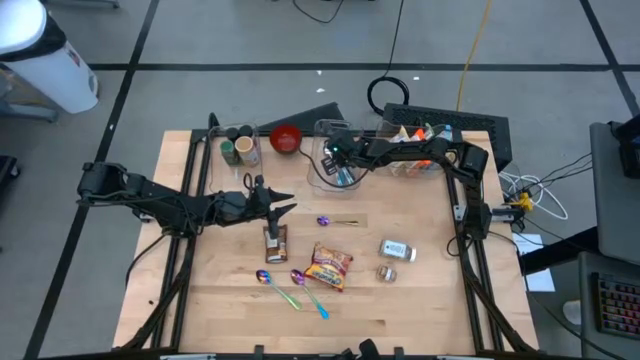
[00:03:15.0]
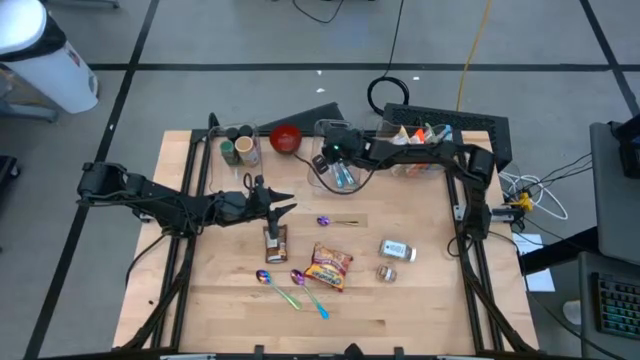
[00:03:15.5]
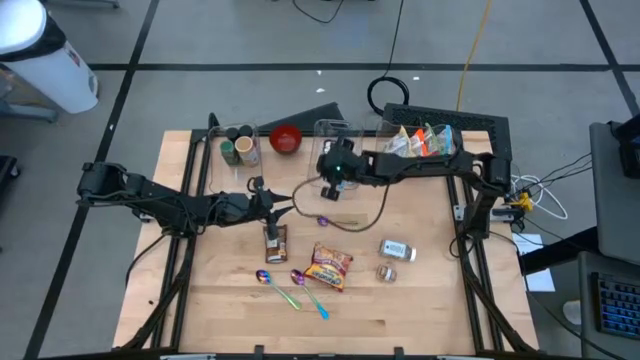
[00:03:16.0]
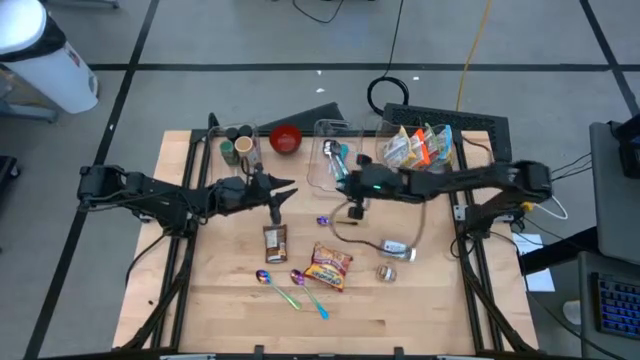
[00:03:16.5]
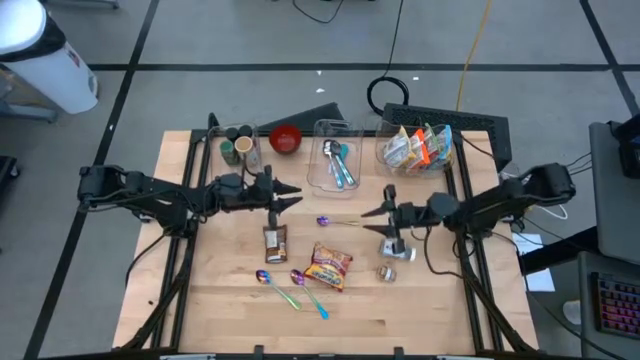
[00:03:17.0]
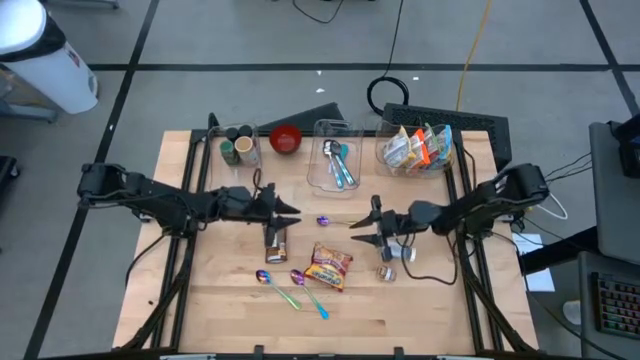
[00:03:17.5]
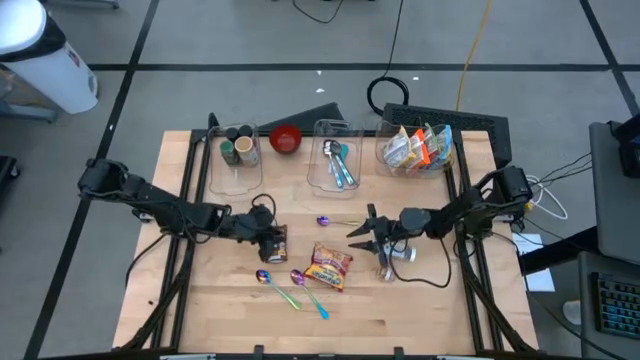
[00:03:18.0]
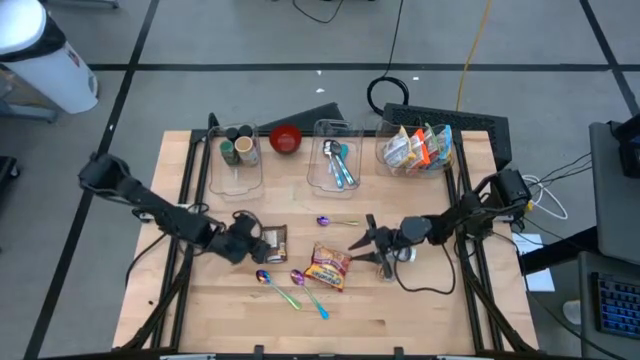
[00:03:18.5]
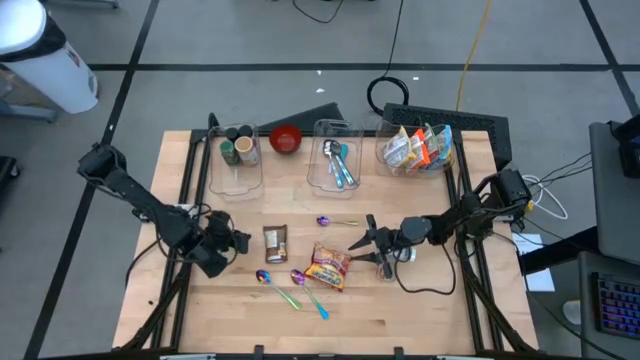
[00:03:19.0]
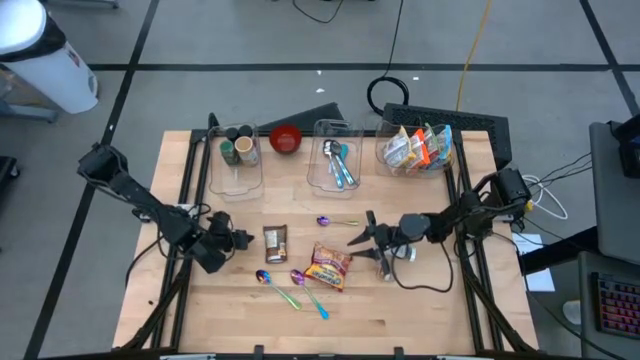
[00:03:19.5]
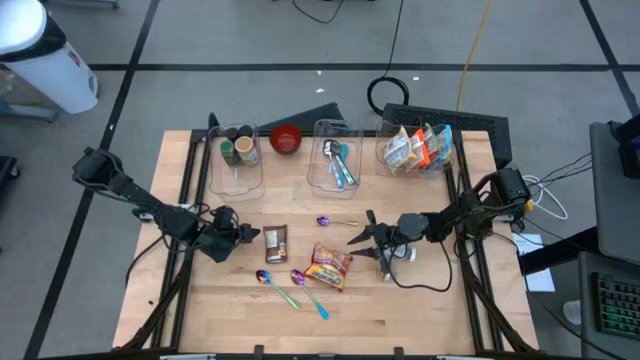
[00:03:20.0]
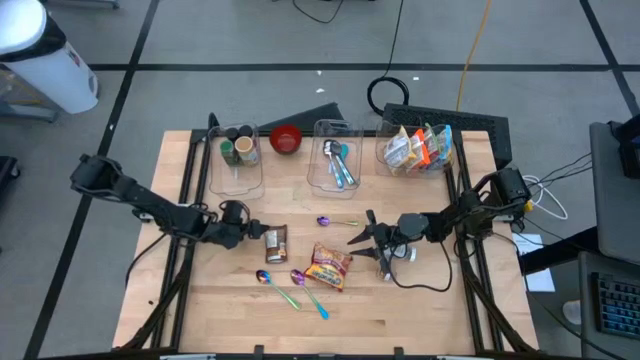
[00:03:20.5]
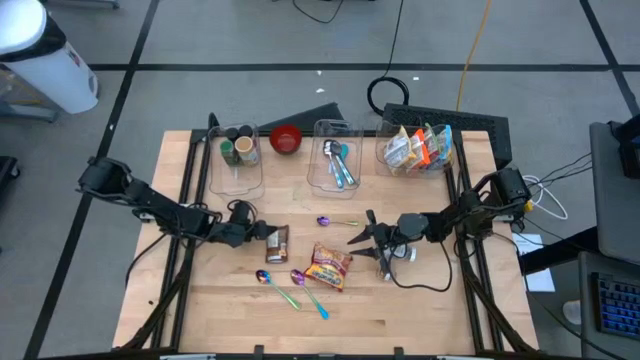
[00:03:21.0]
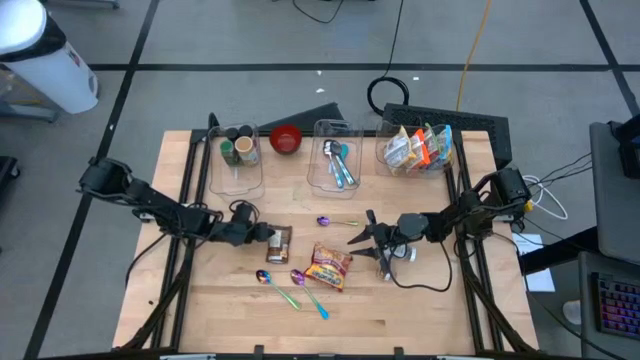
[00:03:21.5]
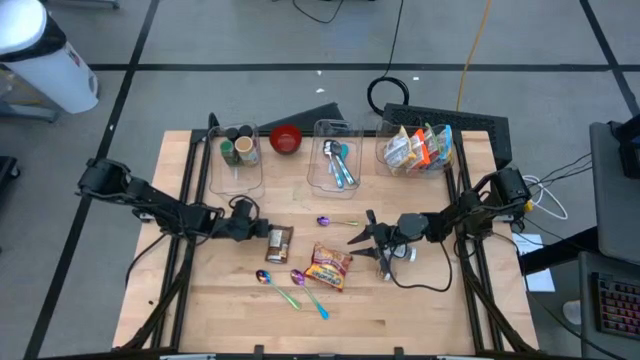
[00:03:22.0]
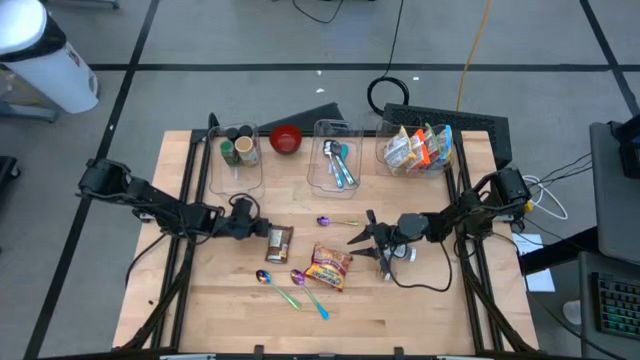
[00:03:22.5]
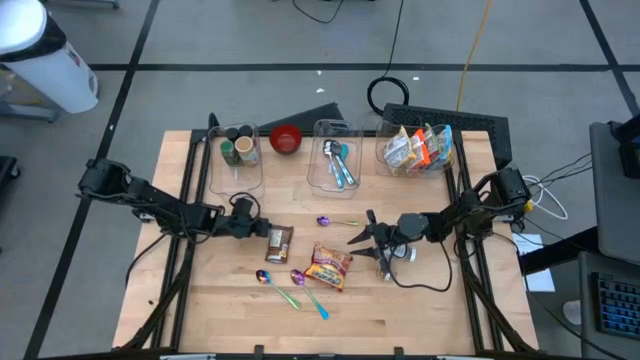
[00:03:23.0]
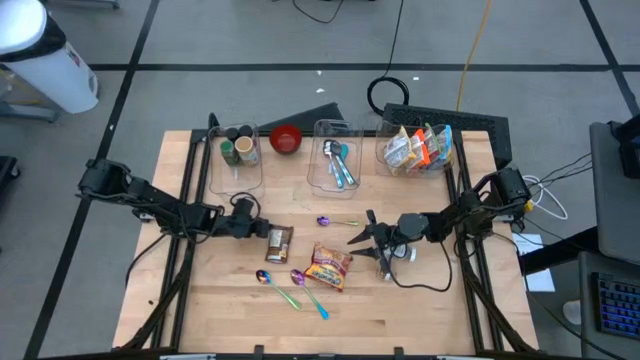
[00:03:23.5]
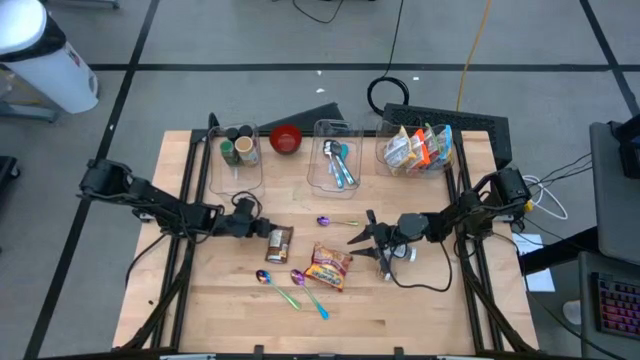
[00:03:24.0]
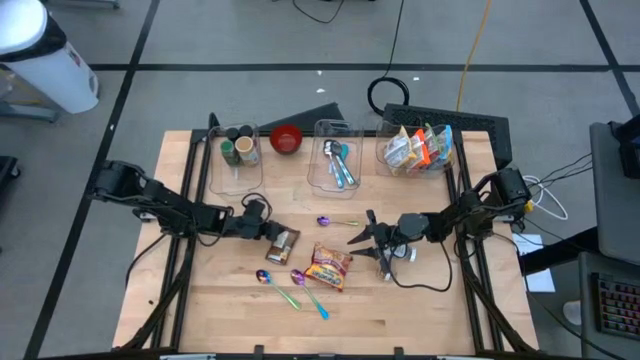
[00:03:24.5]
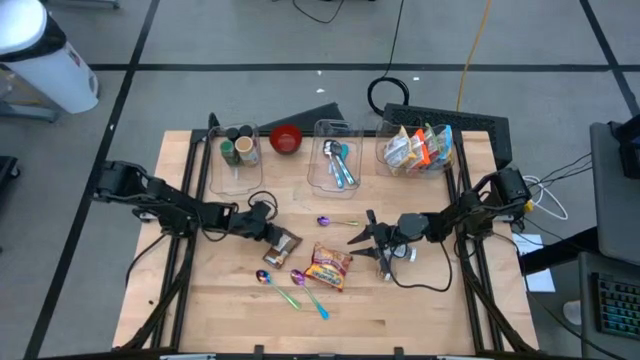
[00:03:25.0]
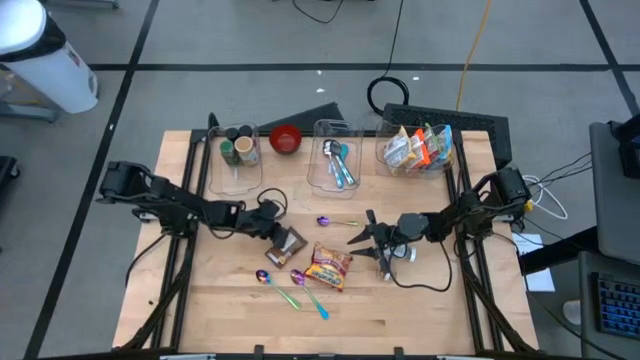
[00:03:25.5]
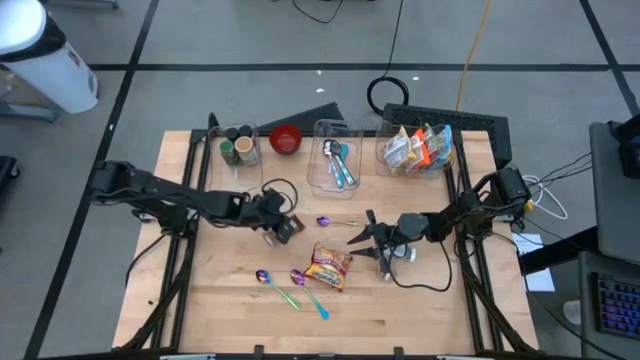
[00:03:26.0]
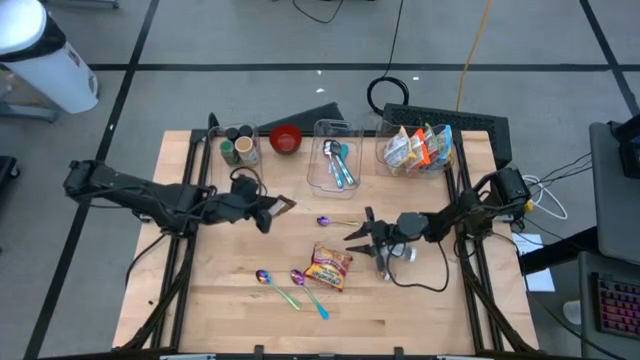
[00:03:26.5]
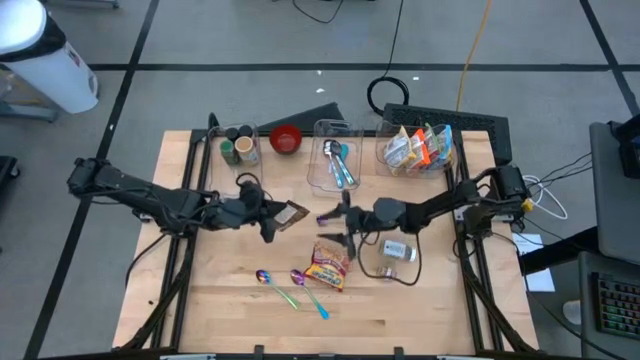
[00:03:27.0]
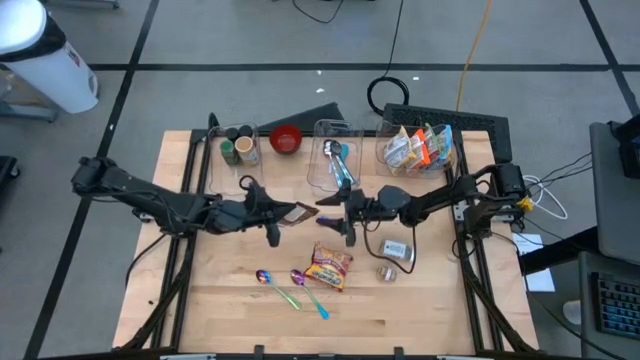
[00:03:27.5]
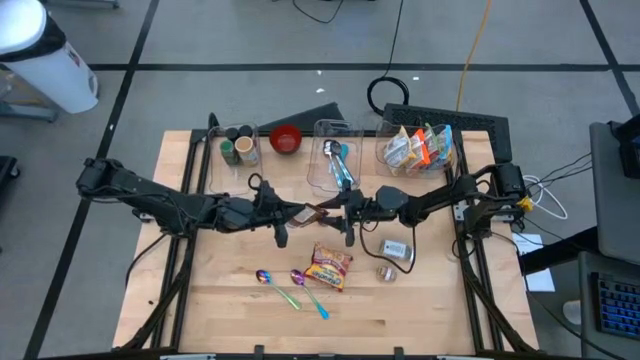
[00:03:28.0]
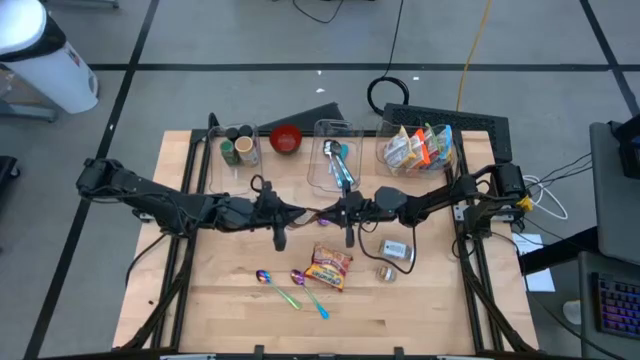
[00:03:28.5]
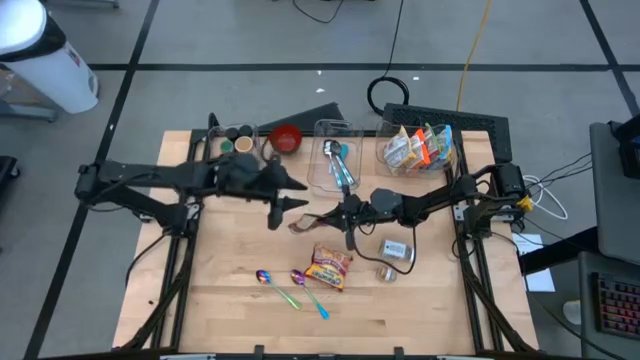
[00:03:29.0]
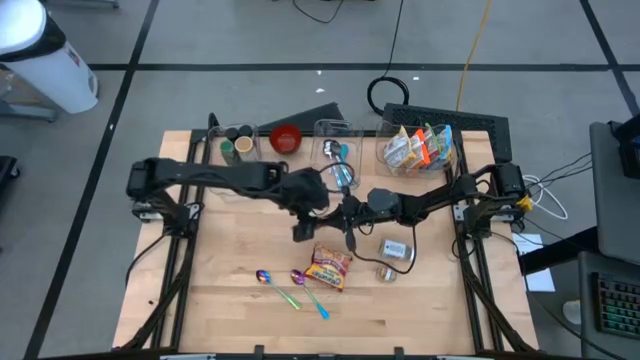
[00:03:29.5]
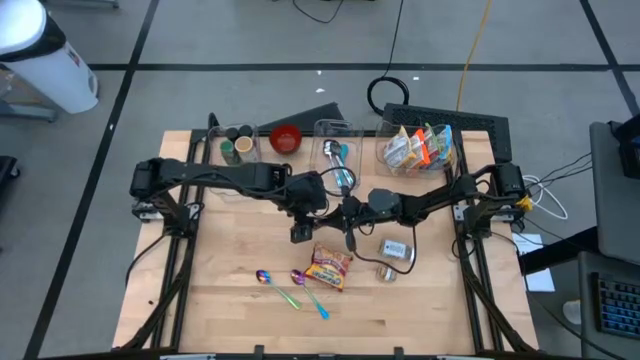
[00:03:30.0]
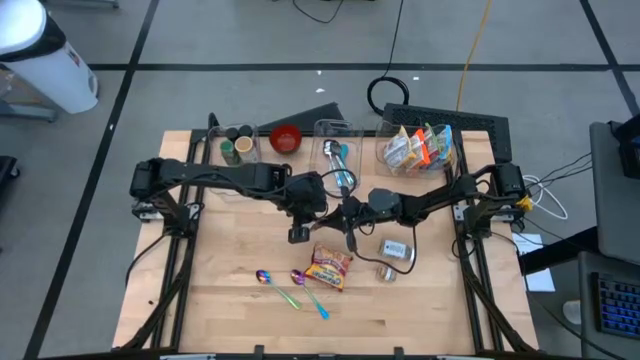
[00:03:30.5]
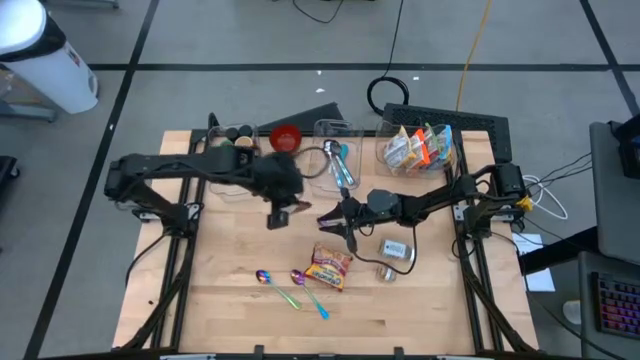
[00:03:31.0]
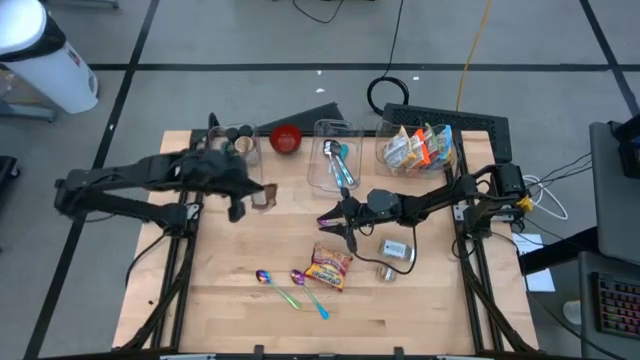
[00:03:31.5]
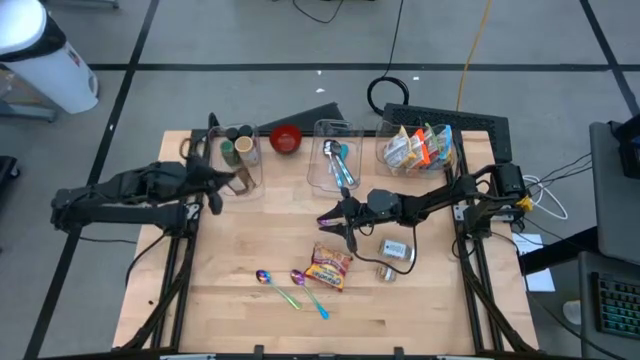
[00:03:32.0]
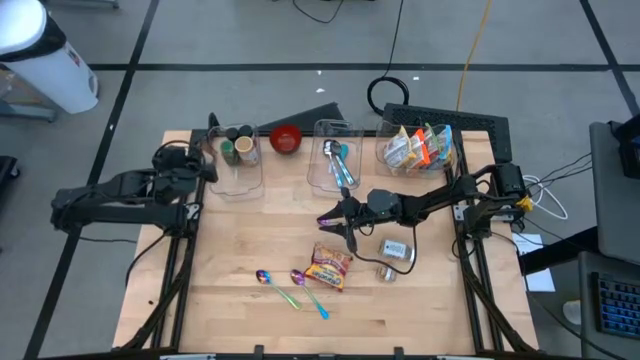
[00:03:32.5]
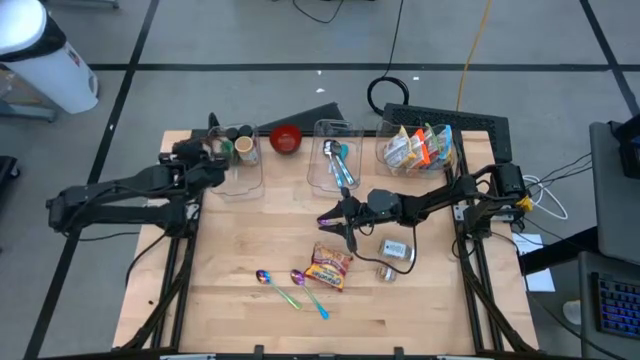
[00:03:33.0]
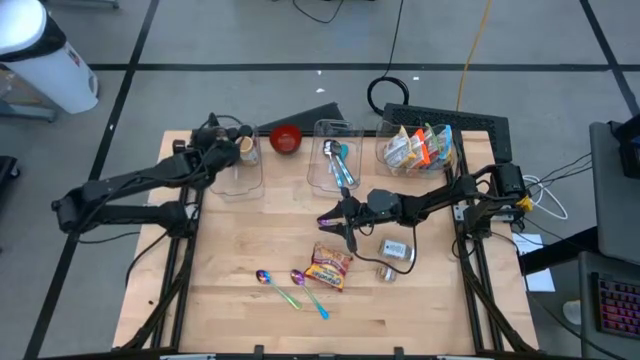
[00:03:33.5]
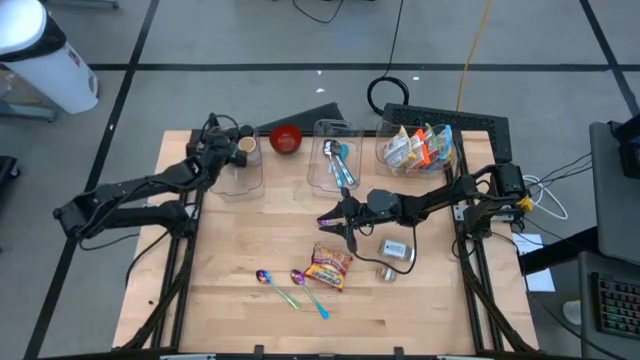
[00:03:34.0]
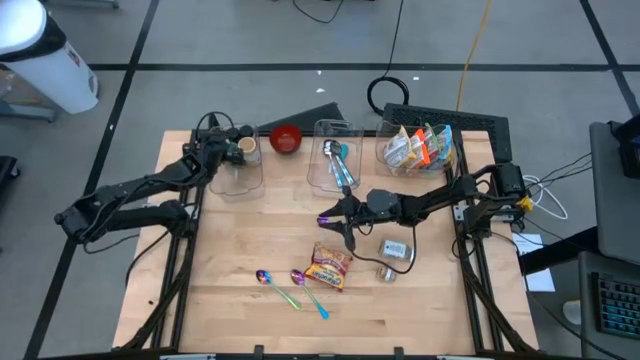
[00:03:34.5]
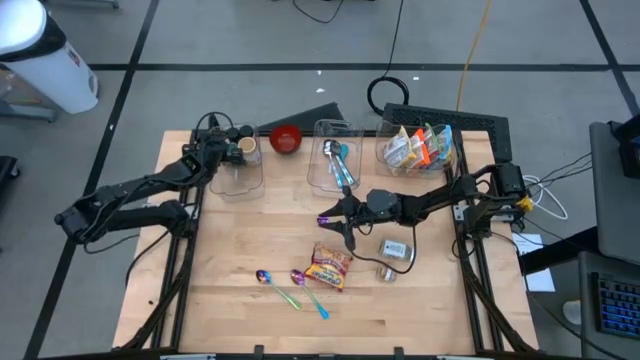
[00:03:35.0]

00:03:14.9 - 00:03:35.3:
Task: Pick & Place Food Item
Put the orange seasoning pack into the left transparent bin
